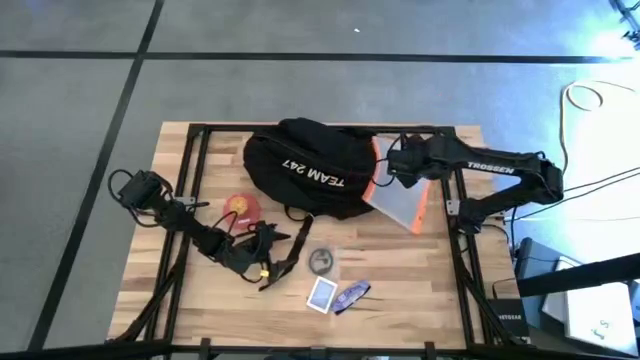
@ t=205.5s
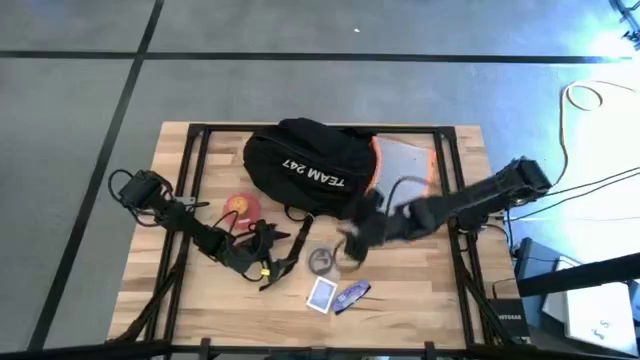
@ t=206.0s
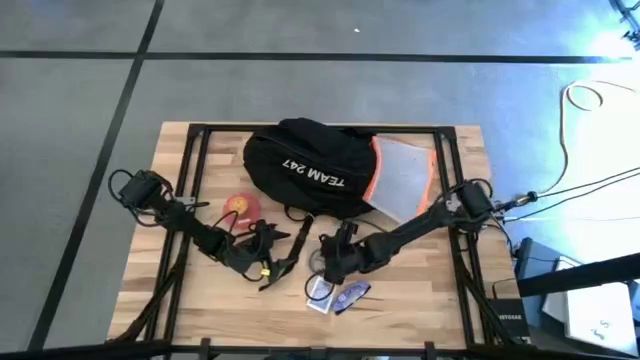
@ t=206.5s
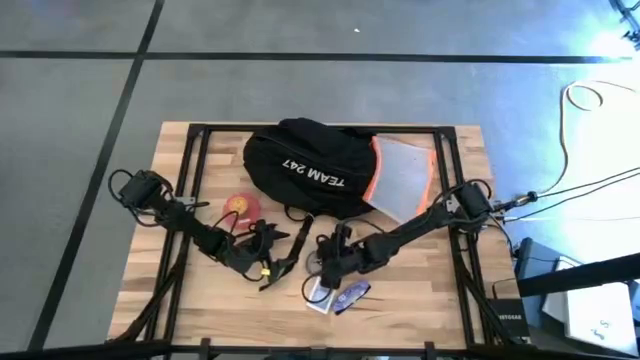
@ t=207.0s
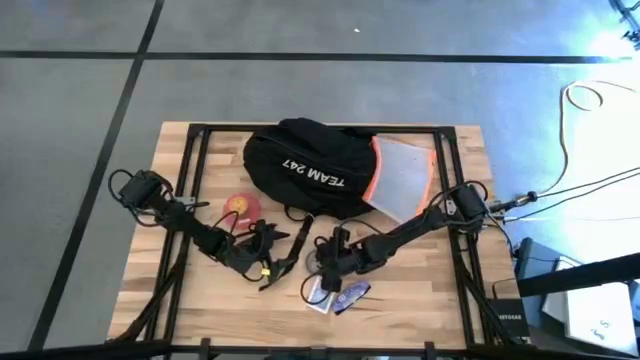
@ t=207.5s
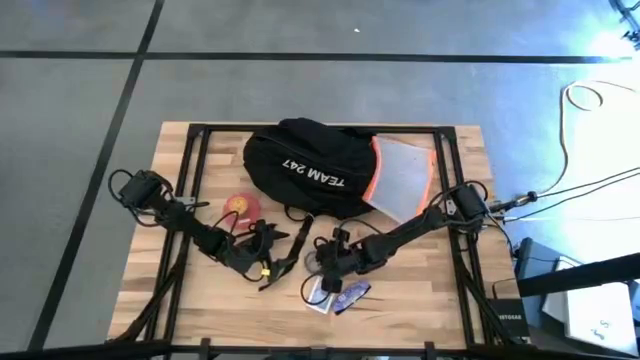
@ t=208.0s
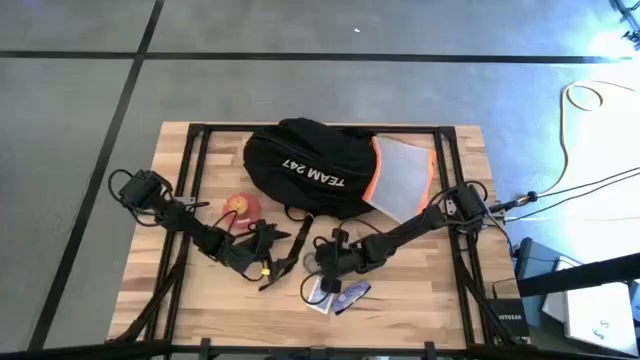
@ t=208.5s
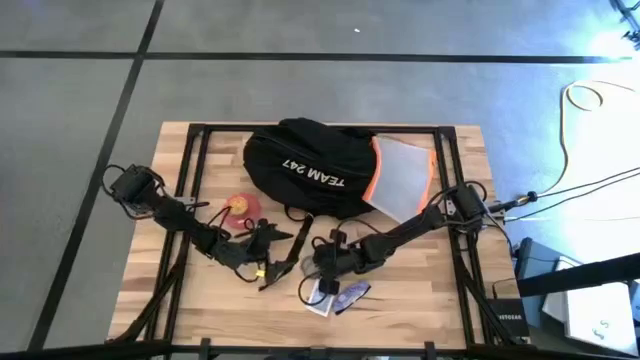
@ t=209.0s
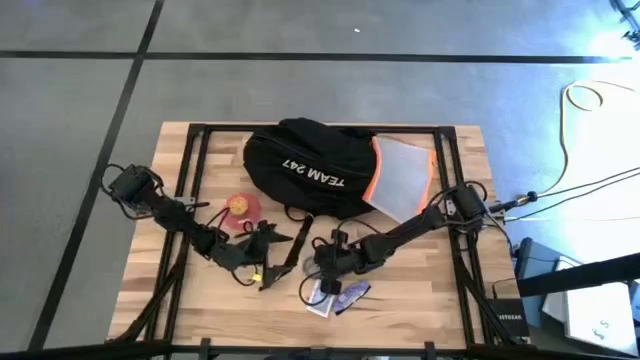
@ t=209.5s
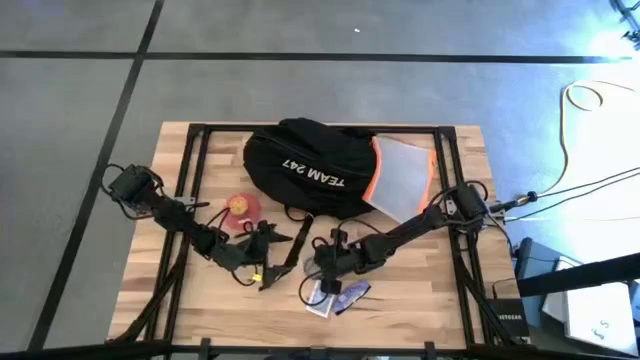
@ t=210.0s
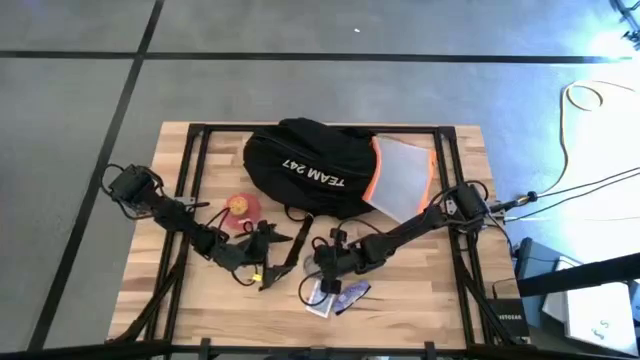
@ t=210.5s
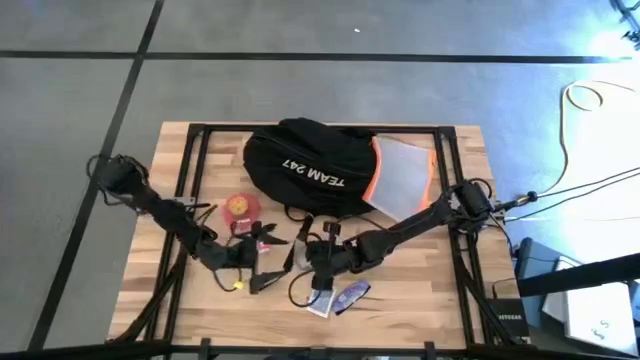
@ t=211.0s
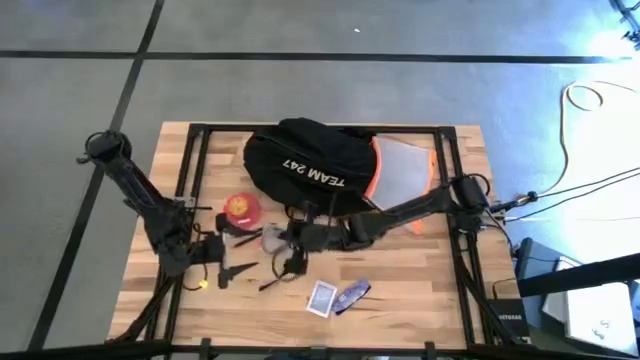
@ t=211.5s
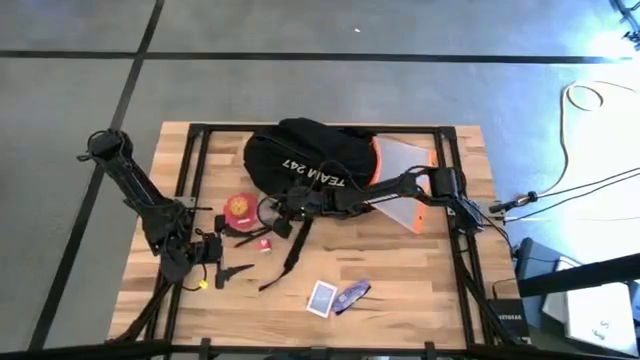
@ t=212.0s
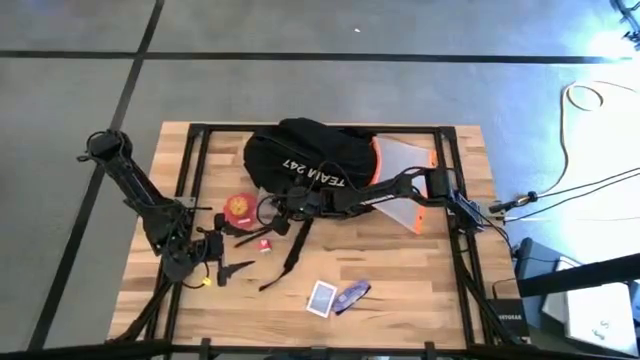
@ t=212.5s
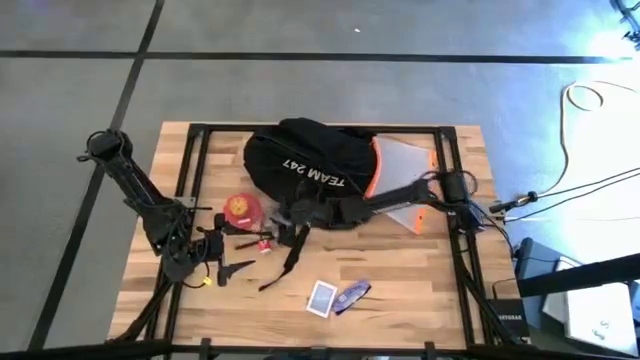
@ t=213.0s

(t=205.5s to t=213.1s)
Task: Unpack backpack
Move the black earphones to the center of the table

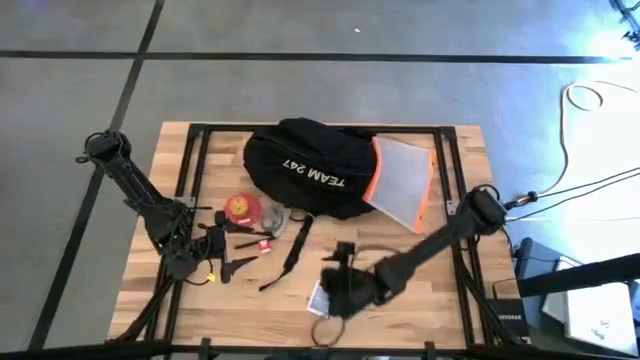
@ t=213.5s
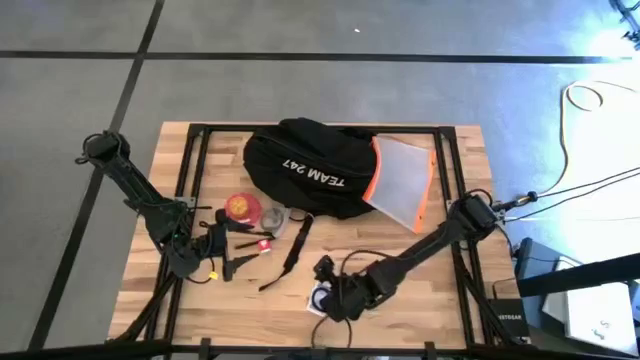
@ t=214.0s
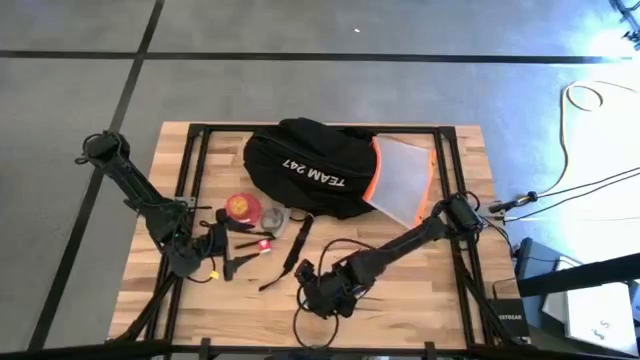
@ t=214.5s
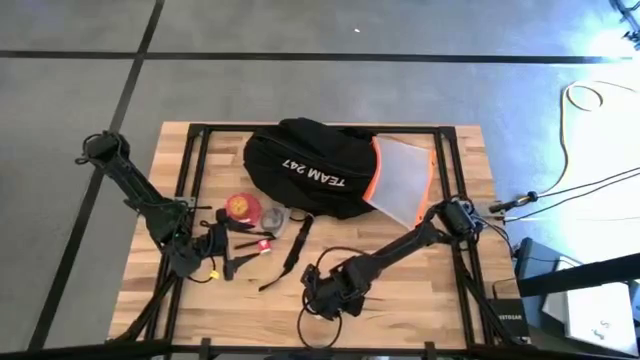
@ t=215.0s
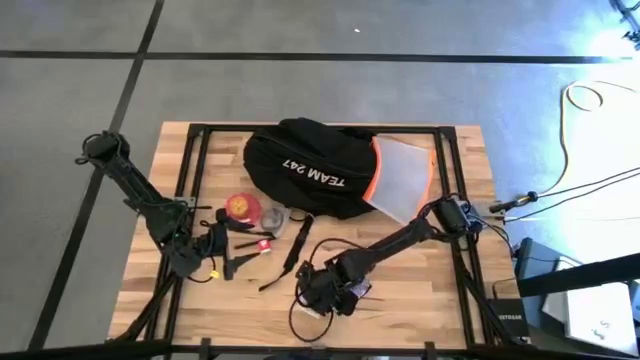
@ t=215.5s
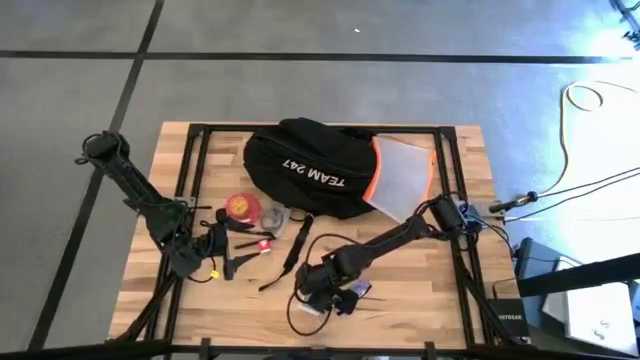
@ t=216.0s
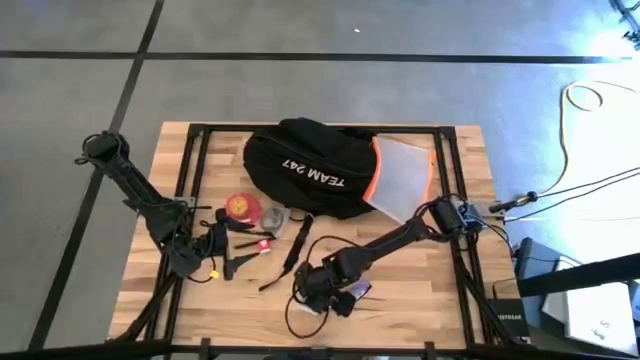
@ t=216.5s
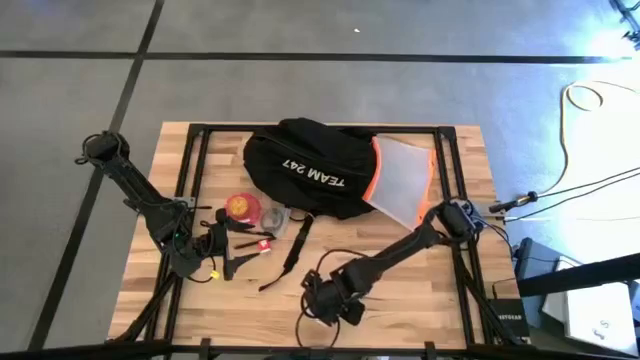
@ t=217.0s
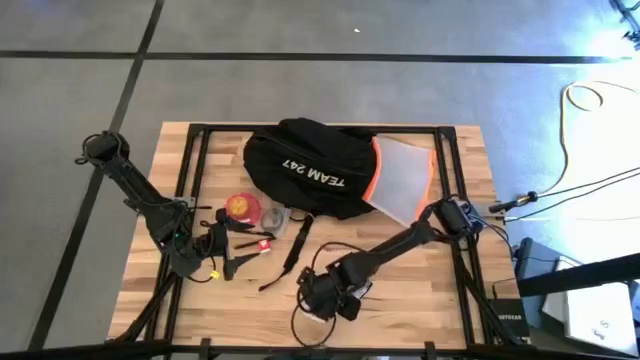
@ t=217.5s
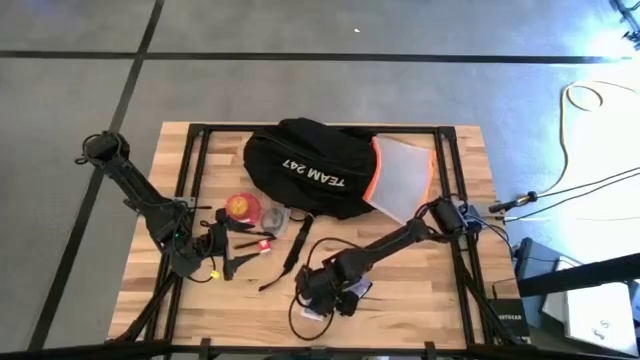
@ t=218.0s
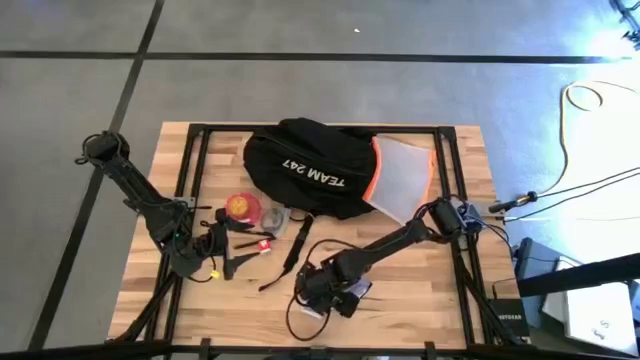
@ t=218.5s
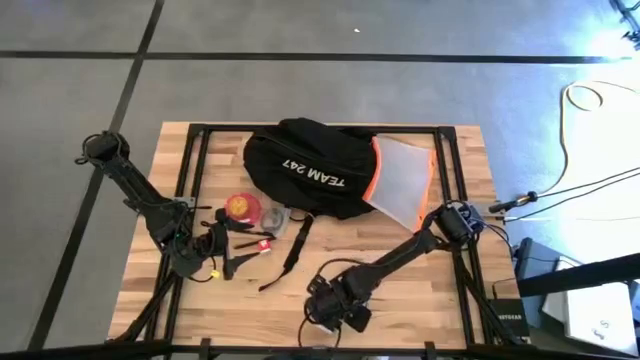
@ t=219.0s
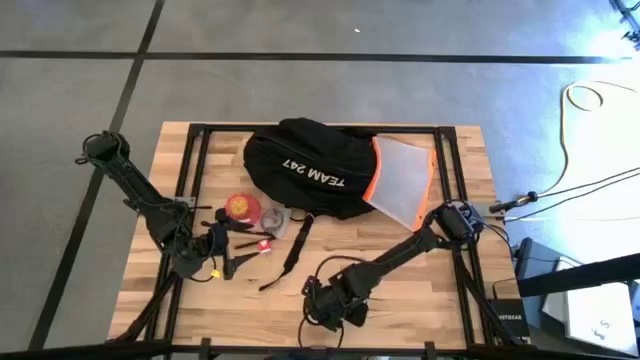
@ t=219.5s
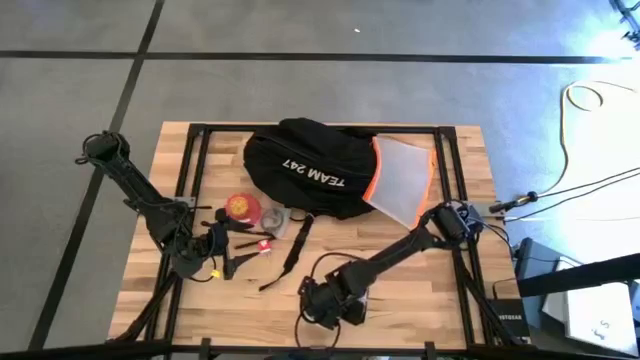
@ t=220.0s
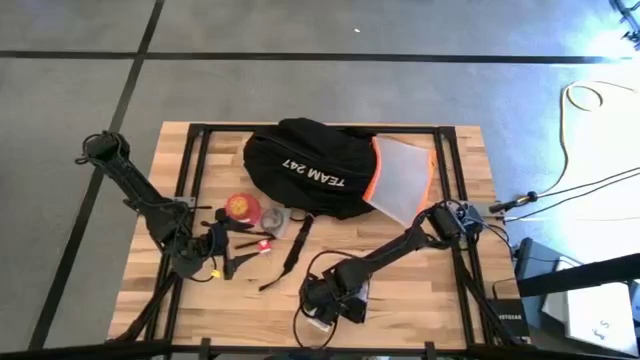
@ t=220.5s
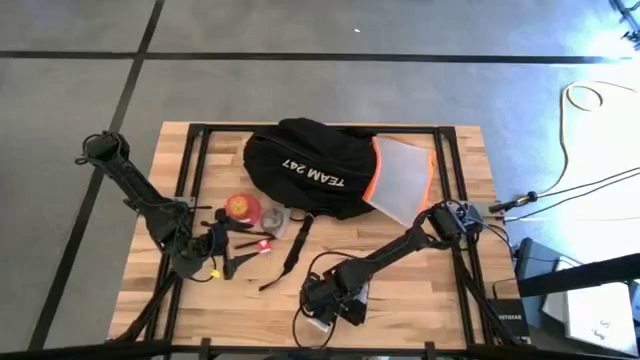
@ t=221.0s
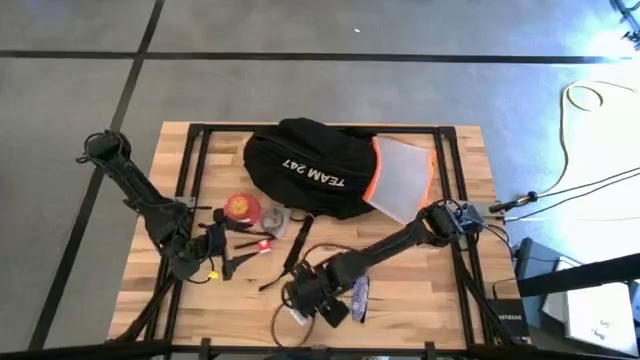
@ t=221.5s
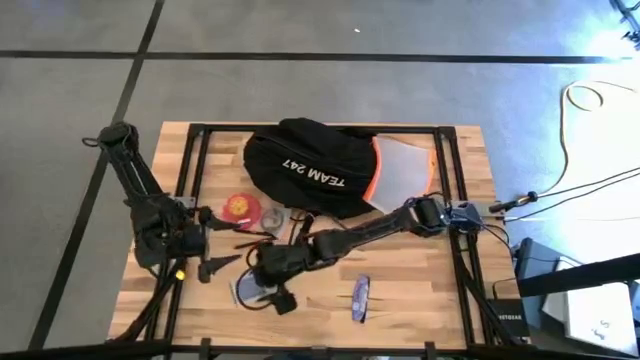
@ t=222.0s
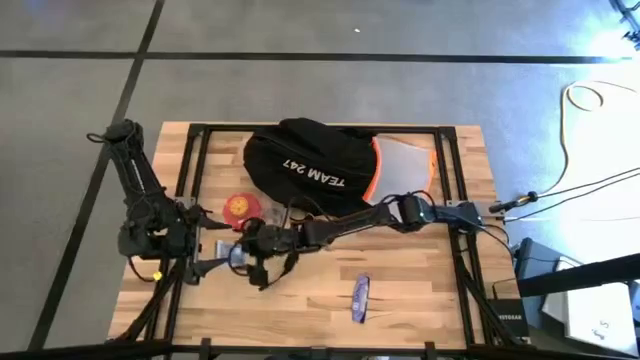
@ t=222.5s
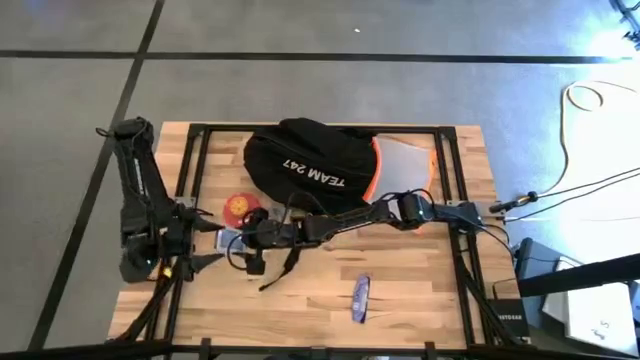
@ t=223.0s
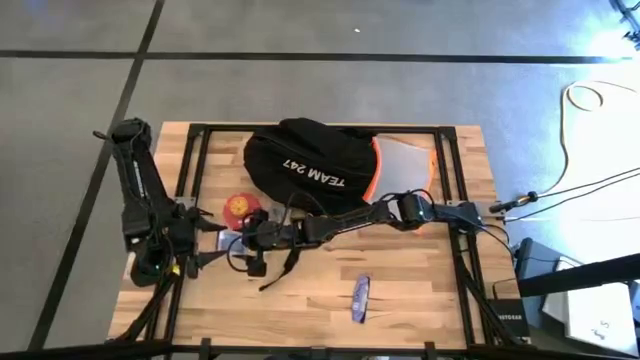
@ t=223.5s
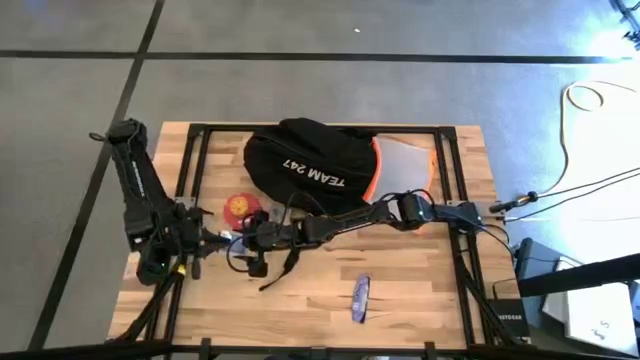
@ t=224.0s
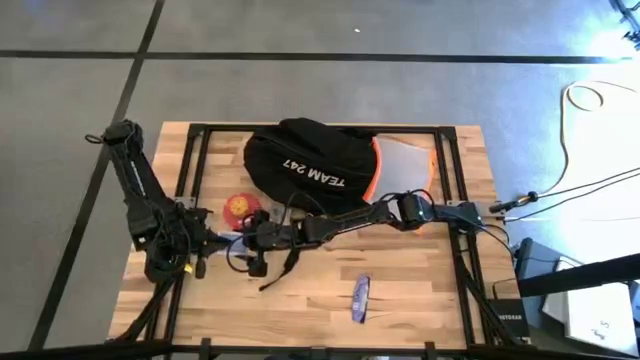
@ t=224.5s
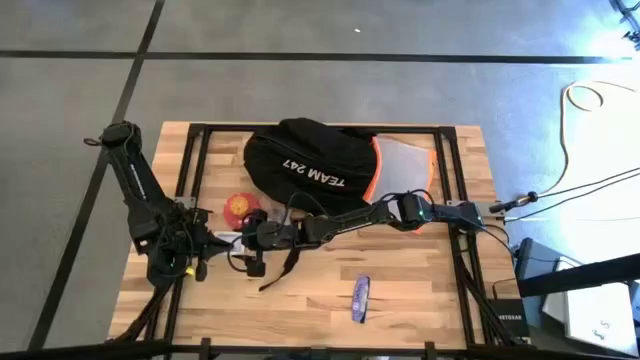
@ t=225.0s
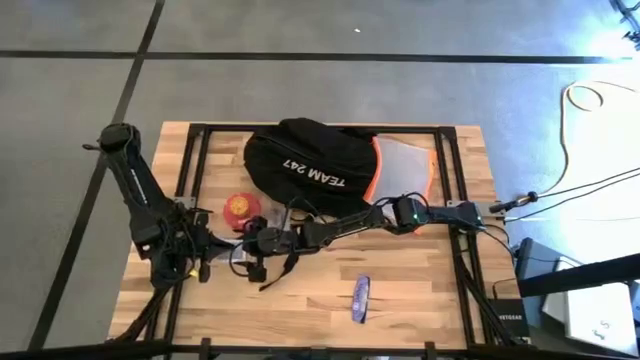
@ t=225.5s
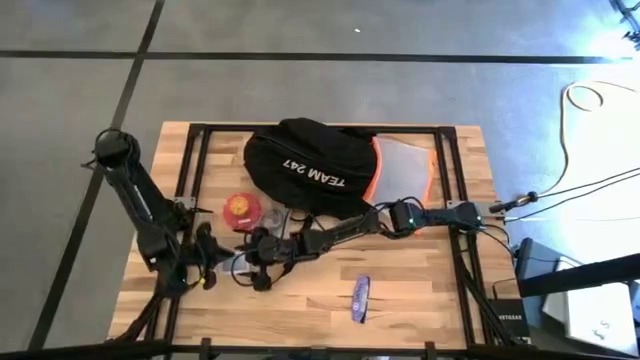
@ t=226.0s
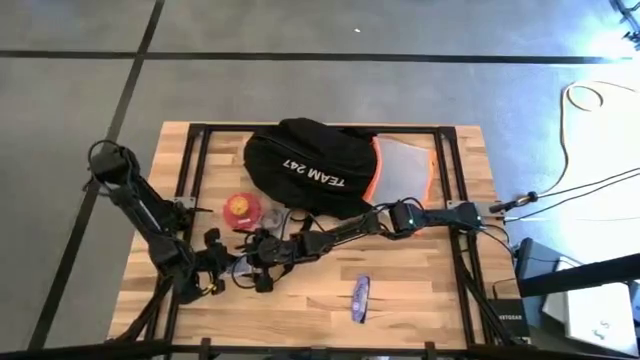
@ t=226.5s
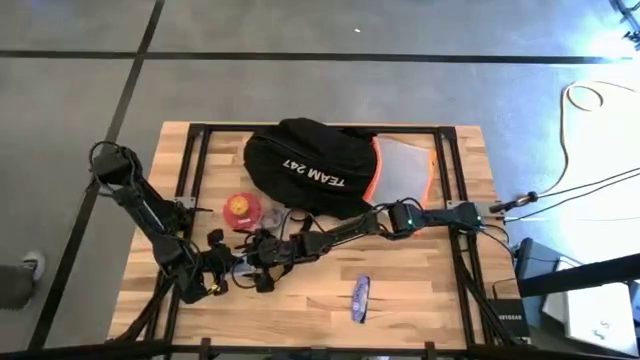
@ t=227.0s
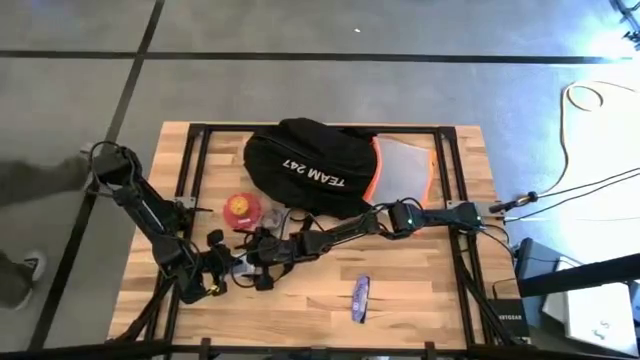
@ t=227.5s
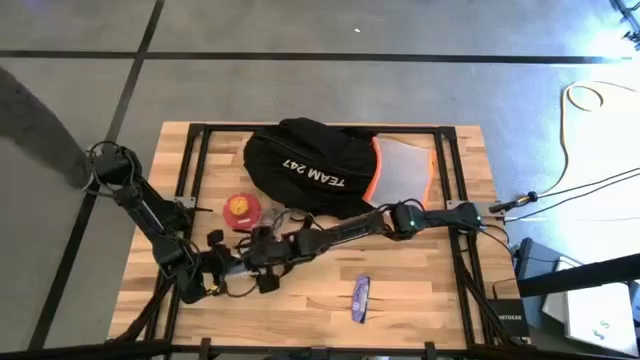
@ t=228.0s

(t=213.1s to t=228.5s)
Move the blue game card to the middle left of the table
